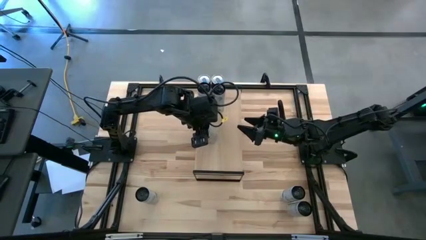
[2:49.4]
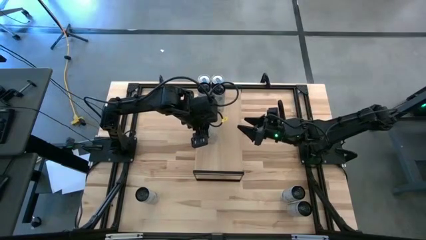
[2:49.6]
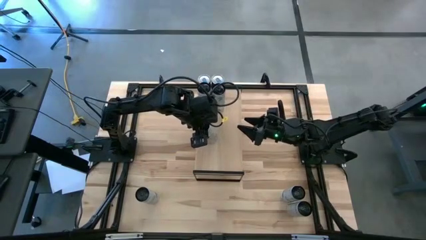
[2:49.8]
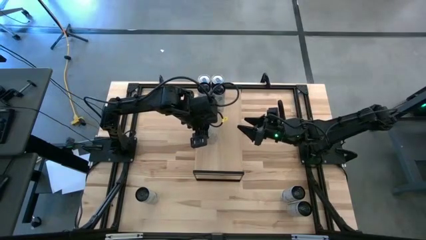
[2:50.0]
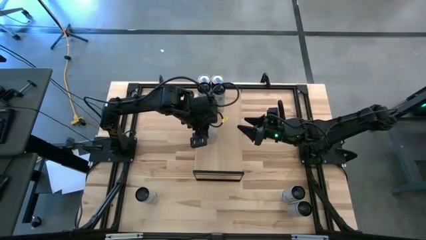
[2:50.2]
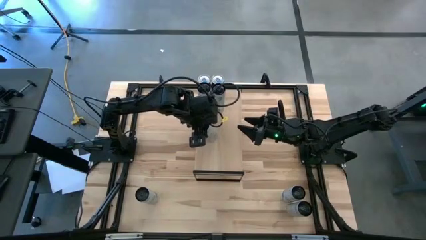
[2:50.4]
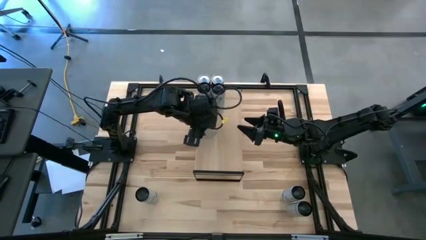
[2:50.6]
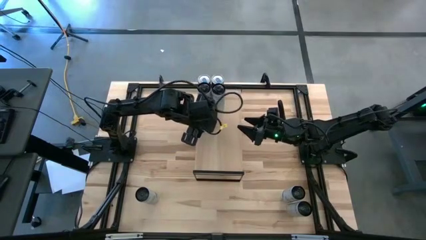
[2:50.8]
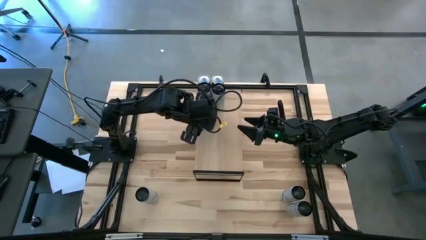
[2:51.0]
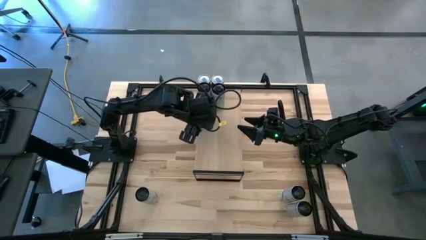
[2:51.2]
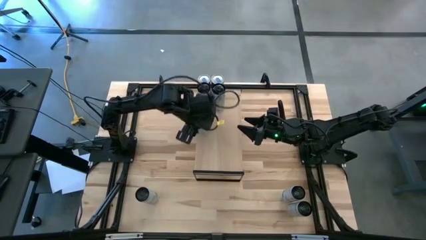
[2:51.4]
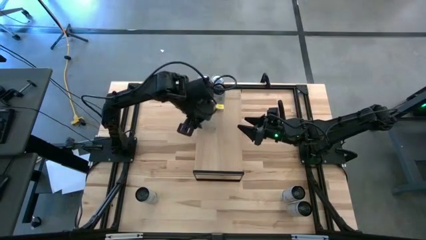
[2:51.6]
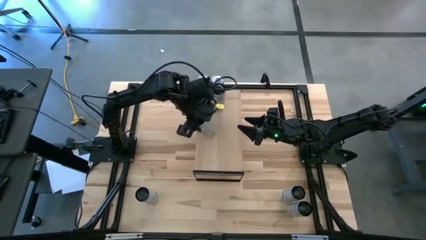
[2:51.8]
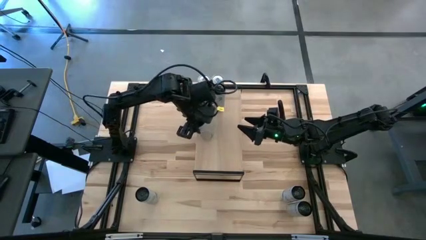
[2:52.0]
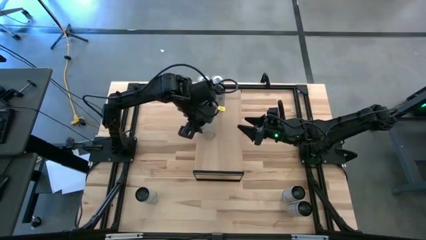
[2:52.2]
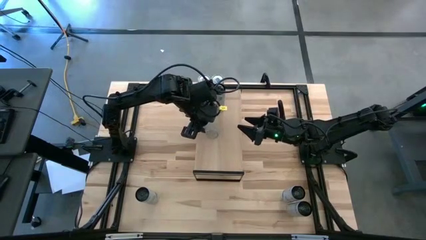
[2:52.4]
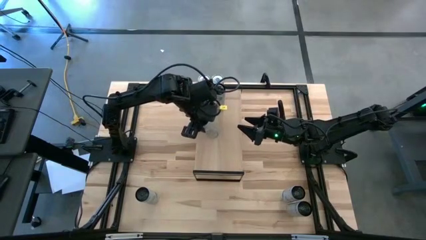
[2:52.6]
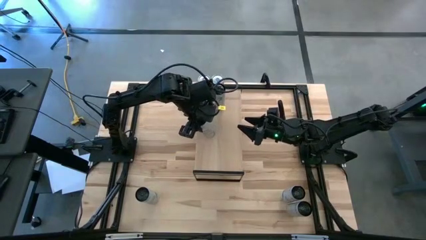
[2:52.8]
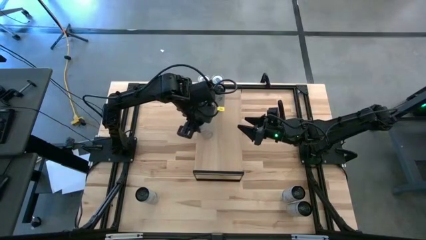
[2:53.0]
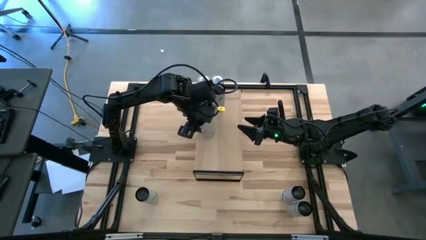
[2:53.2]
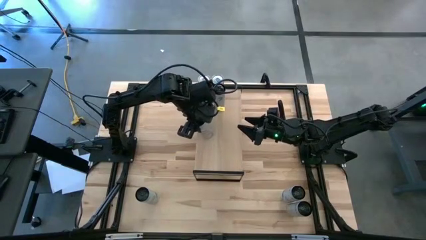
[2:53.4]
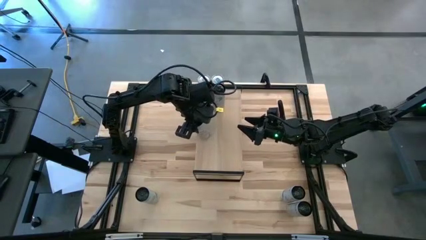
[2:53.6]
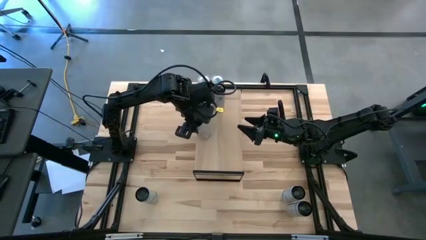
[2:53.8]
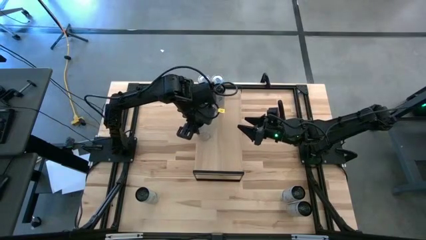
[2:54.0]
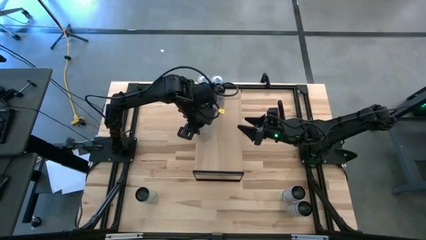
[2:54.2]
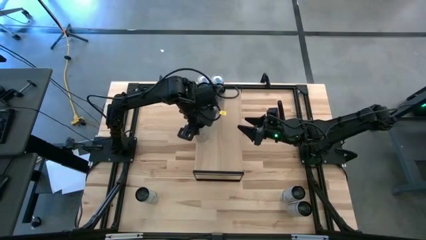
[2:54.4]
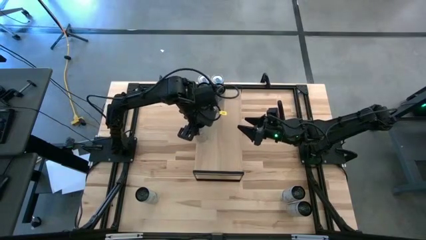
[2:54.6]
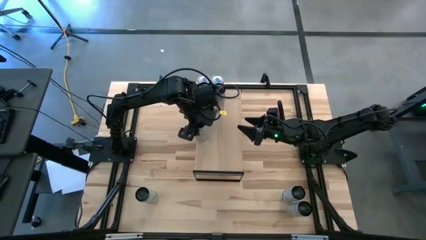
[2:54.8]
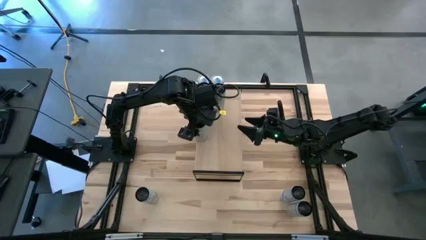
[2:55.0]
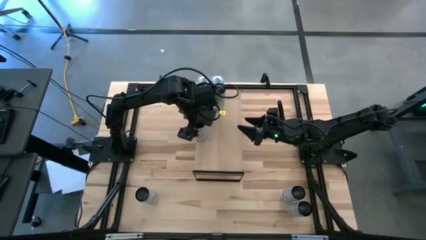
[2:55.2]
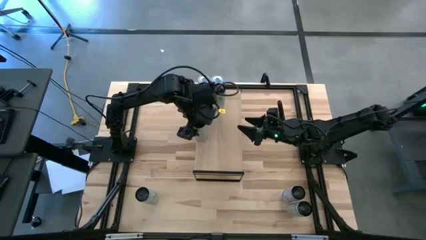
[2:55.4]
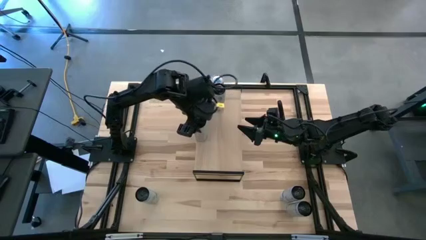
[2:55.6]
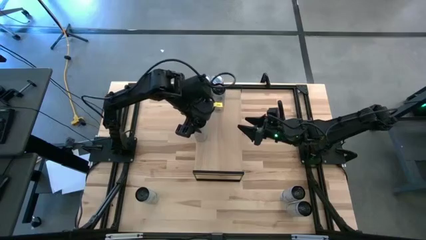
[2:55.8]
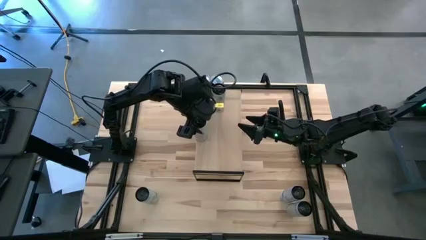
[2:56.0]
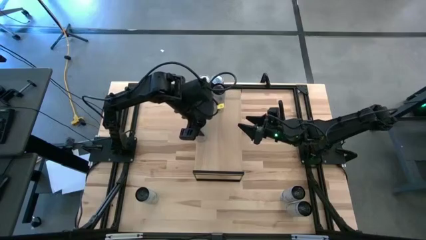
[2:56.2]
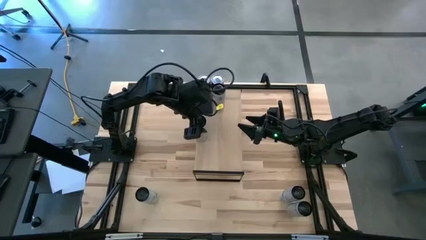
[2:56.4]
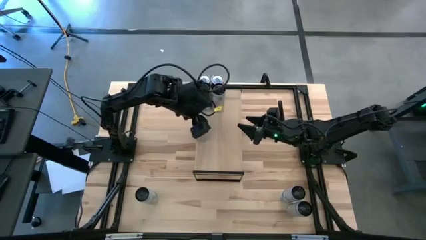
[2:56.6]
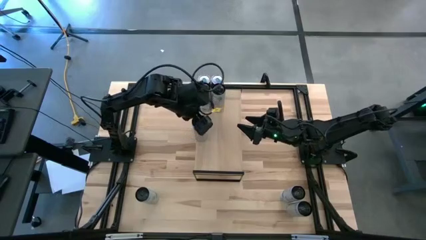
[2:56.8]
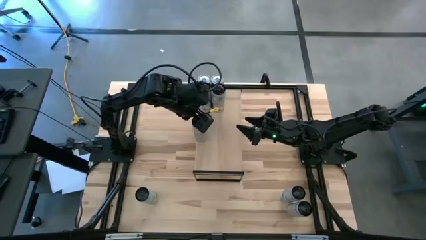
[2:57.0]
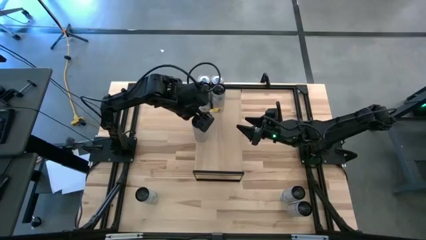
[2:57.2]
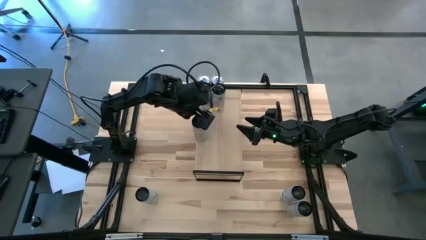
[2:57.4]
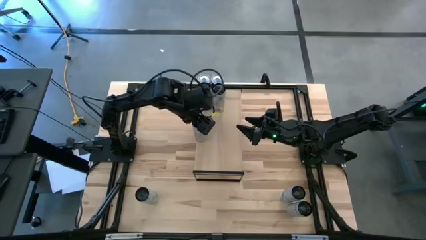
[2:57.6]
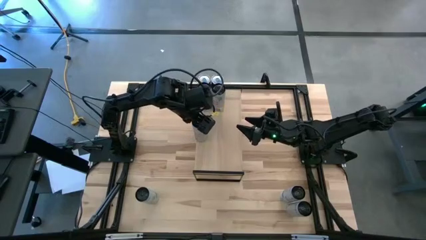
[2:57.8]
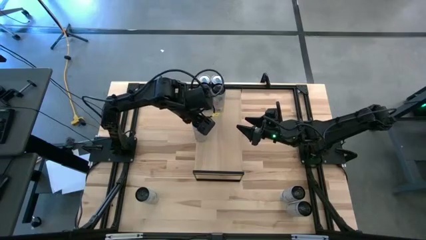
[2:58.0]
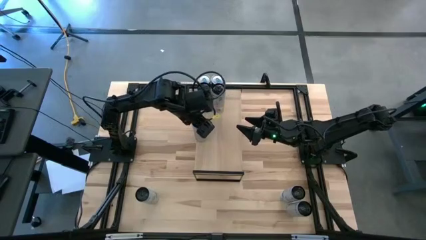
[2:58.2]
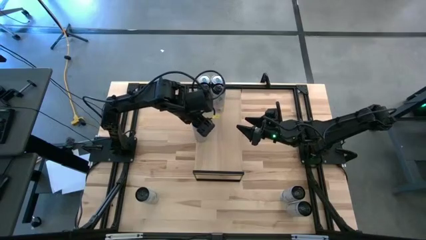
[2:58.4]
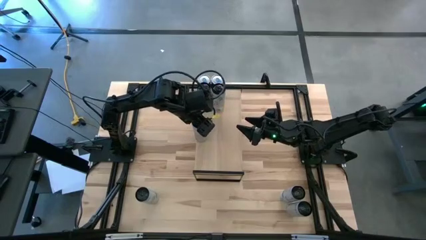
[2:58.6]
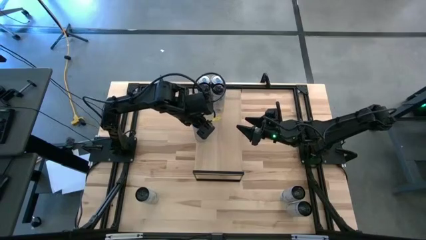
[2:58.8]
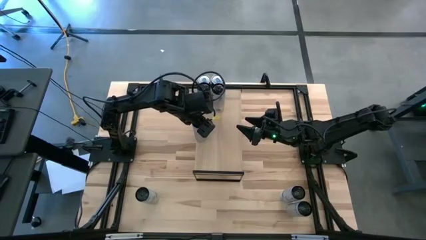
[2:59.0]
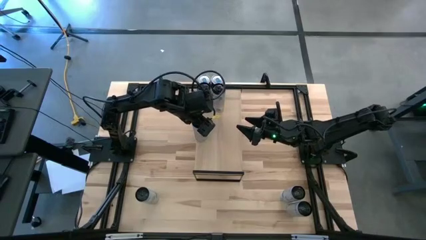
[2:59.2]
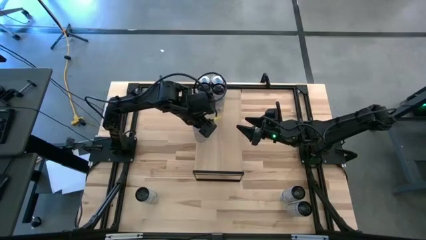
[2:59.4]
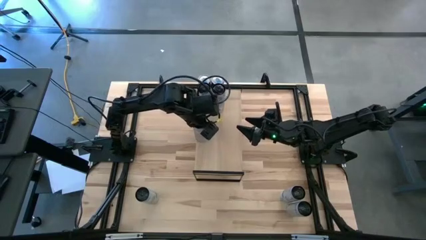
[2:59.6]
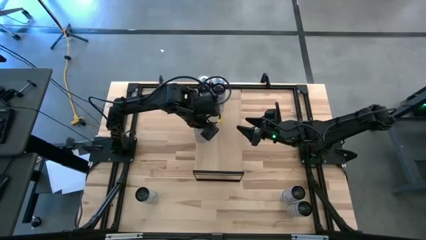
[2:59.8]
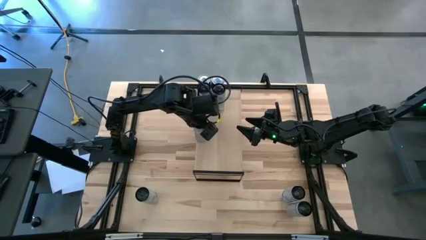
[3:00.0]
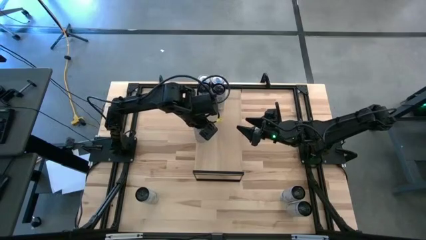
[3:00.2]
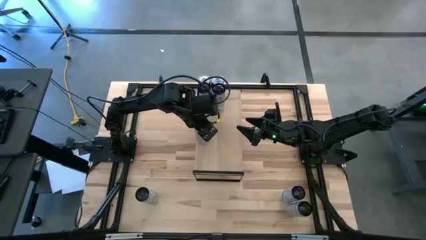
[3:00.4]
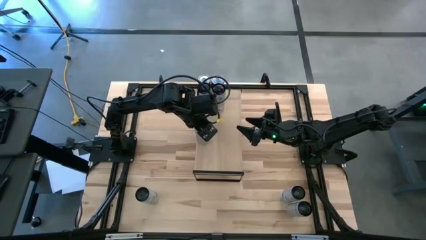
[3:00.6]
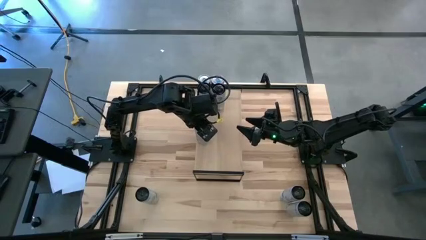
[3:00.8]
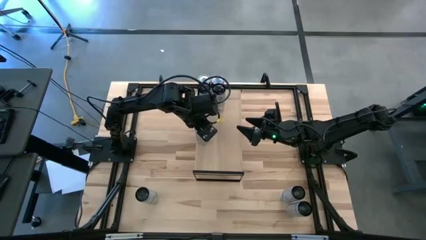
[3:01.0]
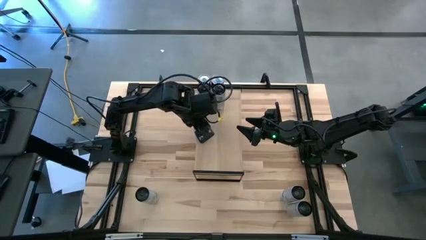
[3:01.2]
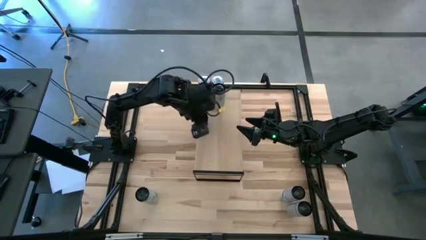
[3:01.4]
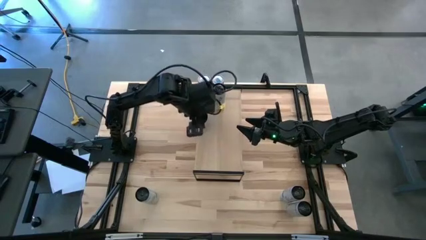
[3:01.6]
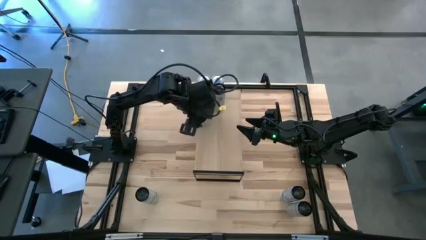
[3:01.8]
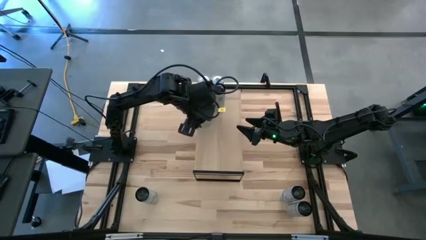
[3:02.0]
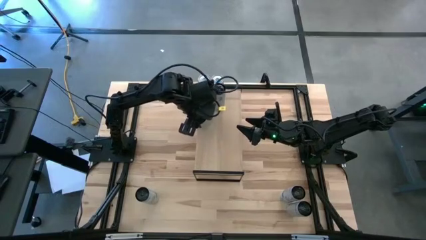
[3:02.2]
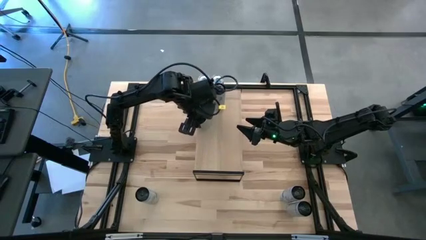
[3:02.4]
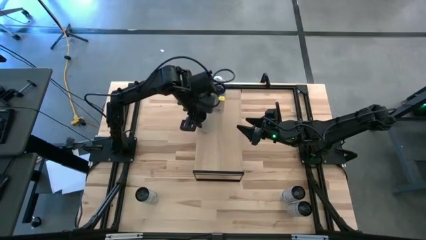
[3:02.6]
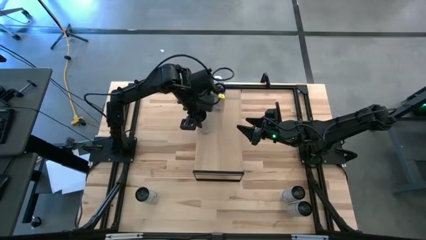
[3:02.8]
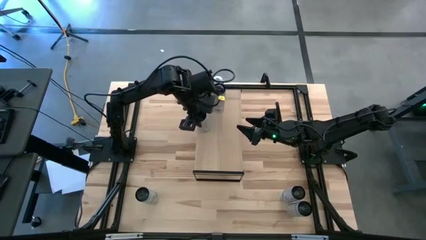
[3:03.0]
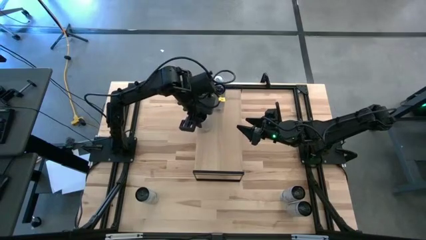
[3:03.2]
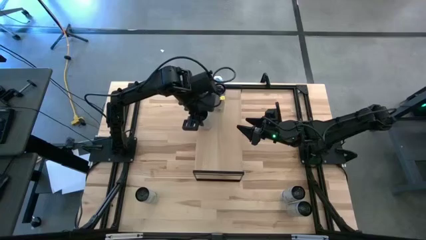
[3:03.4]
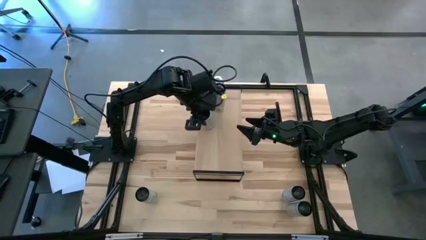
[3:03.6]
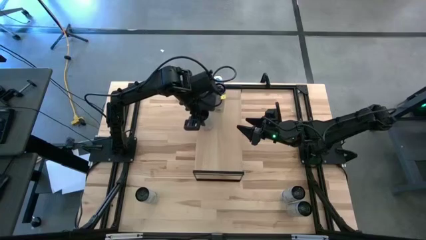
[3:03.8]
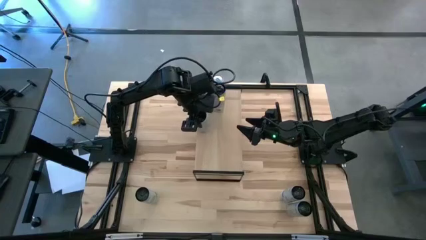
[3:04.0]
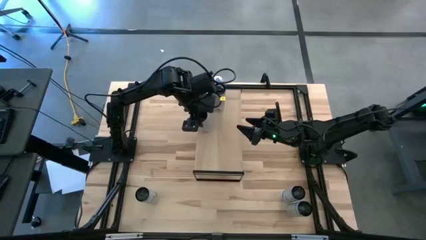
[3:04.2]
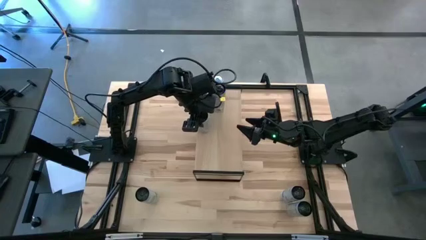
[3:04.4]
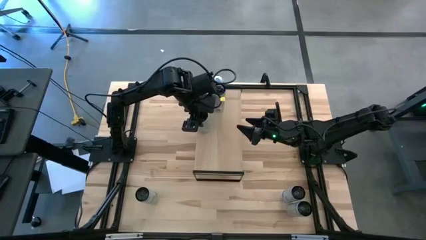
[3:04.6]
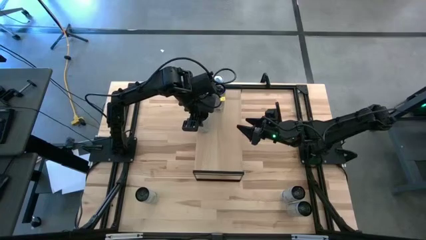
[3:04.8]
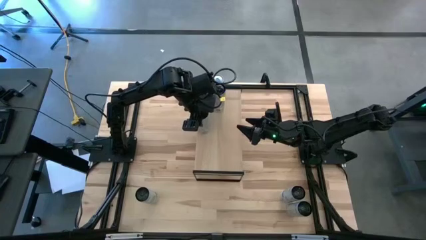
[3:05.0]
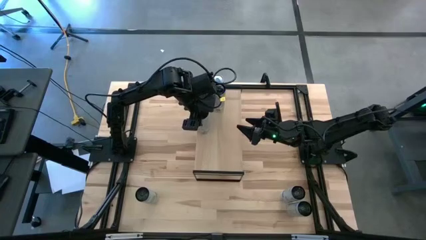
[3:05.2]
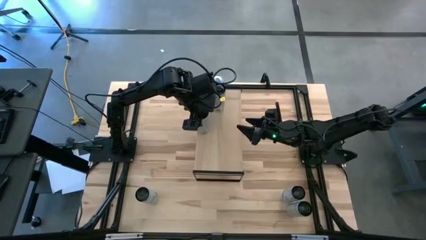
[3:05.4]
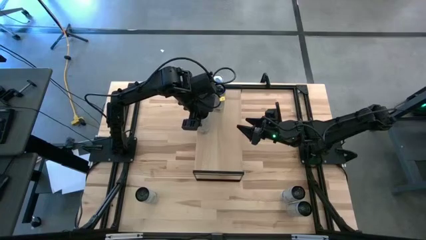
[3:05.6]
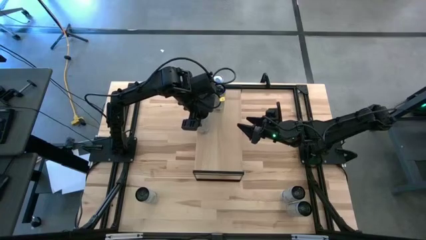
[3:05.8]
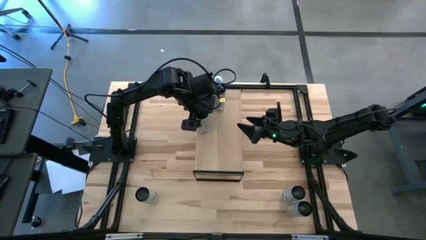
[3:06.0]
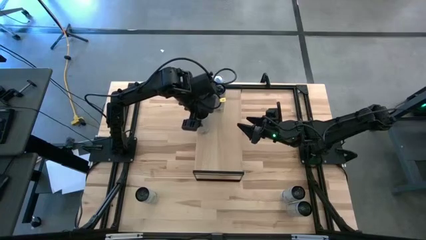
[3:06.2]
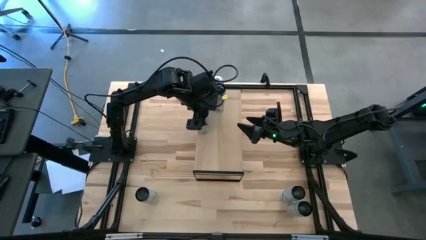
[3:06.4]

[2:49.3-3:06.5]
Task: Place canned beverage on shelf
Put the left white yellow soda can on the shelf
